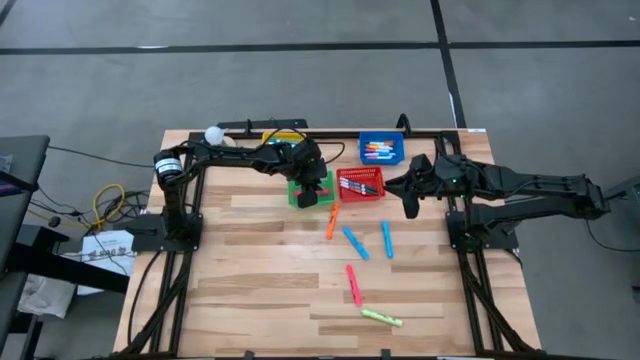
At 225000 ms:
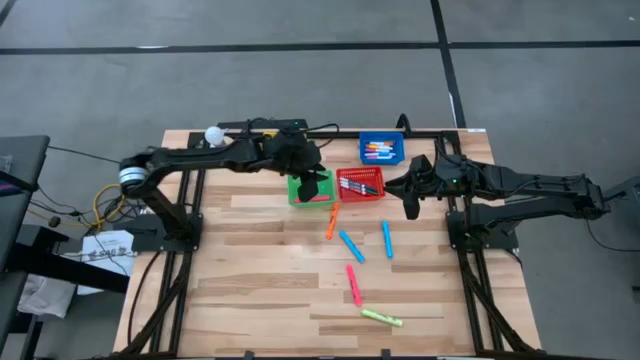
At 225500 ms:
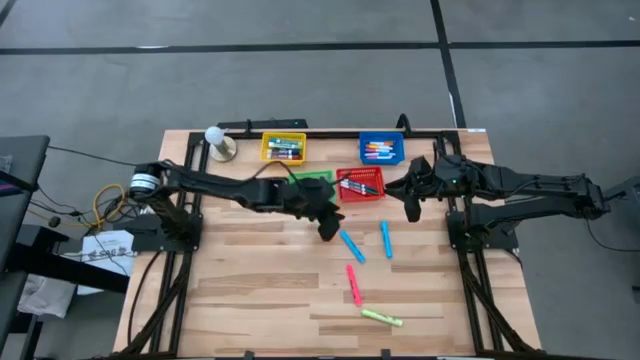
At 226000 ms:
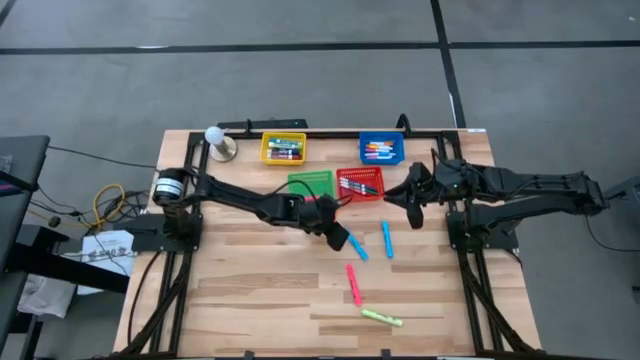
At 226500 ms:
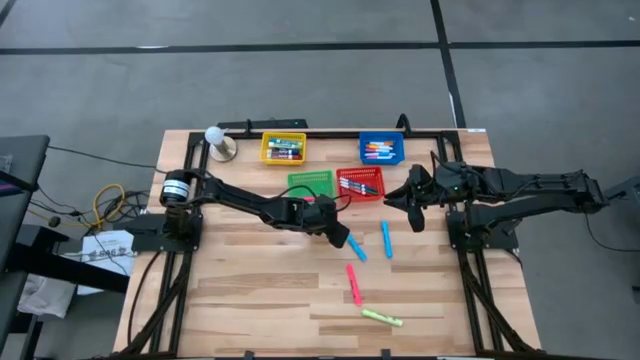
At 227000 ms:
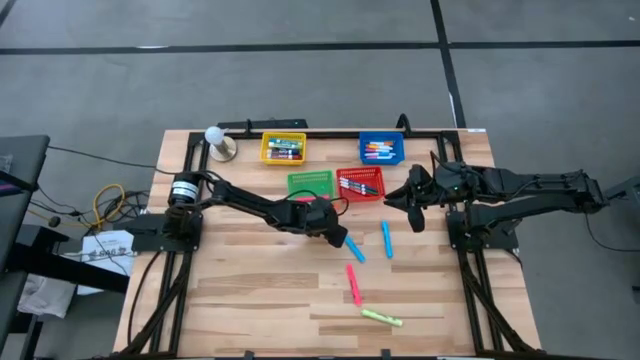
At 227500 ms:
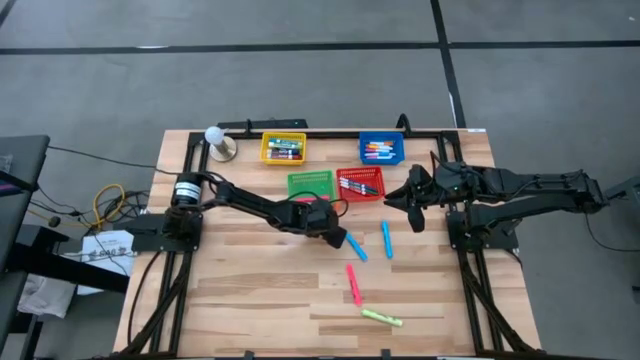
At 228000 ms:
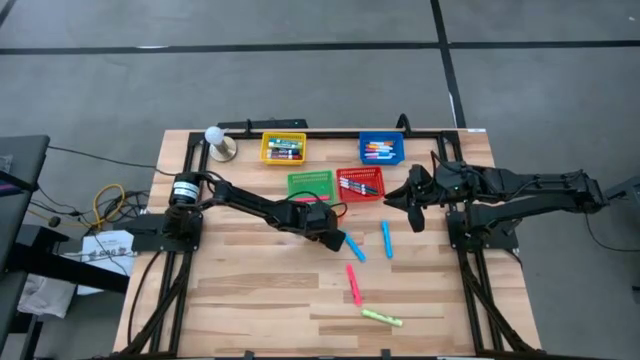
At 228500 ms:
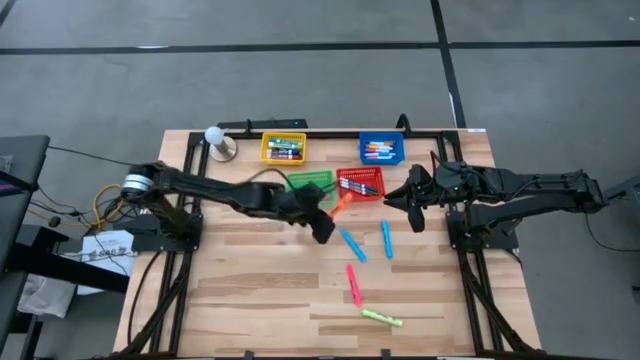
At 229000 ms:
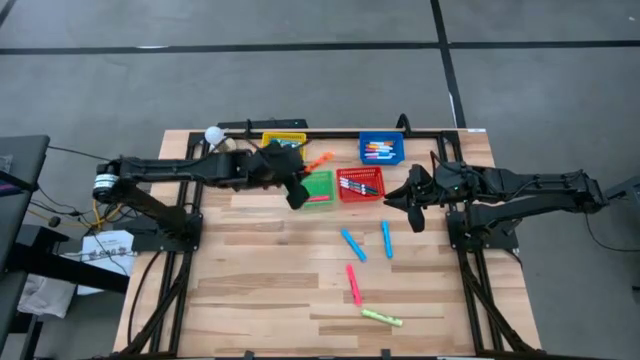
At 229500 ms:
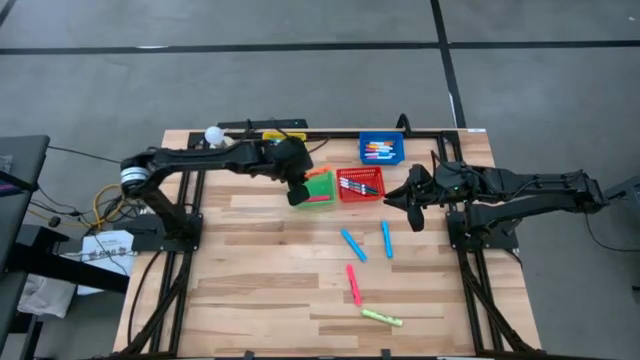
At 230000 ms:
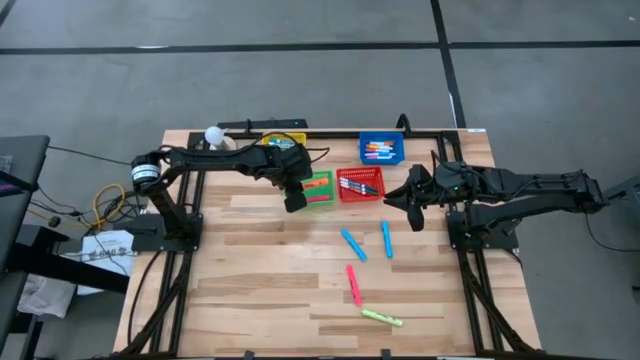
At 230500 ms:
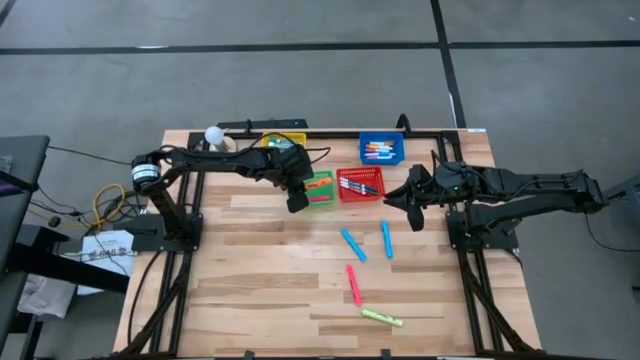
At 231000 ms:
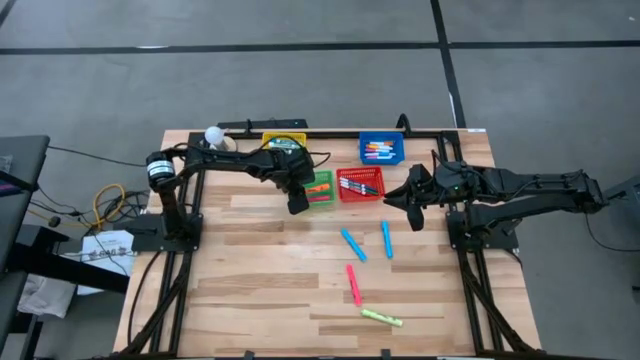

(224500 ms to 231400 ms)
Task: Pick & Place Markers
Put the large orange highlighter pen into the green bin

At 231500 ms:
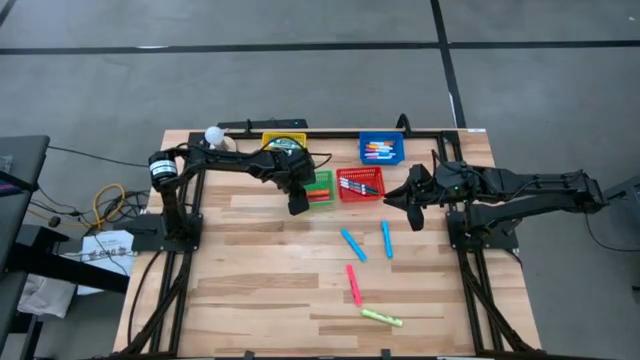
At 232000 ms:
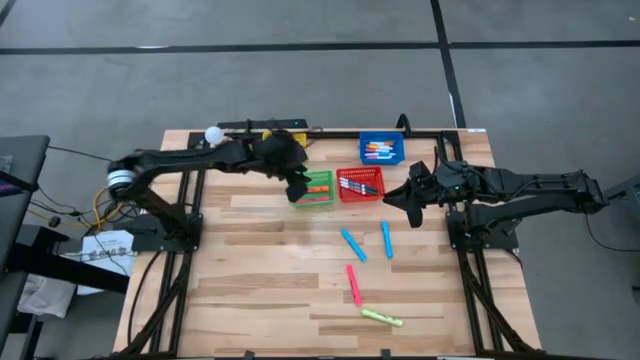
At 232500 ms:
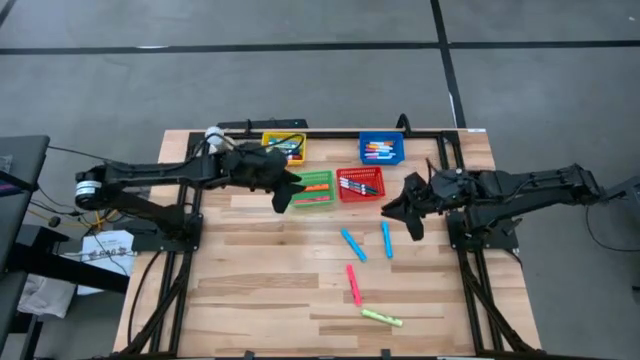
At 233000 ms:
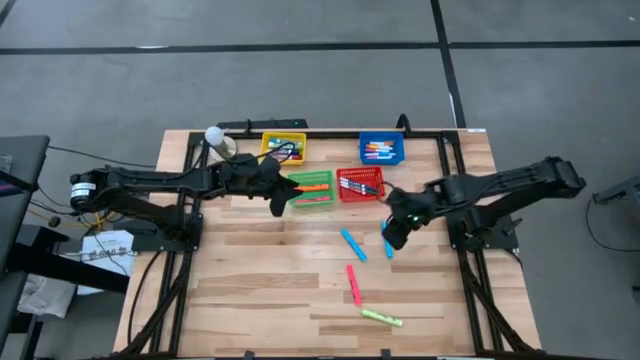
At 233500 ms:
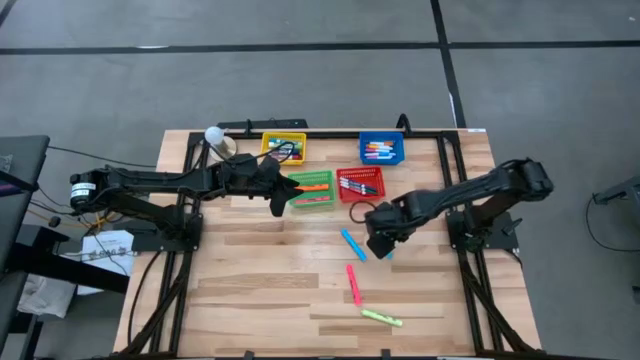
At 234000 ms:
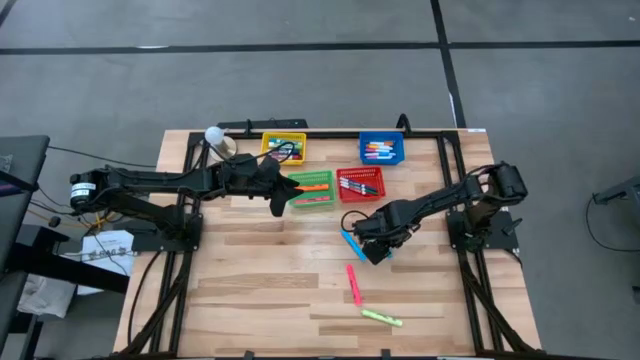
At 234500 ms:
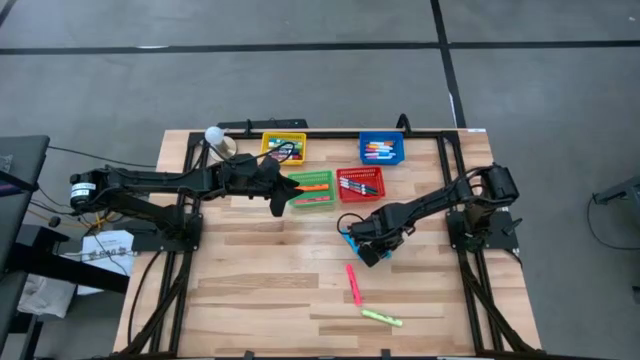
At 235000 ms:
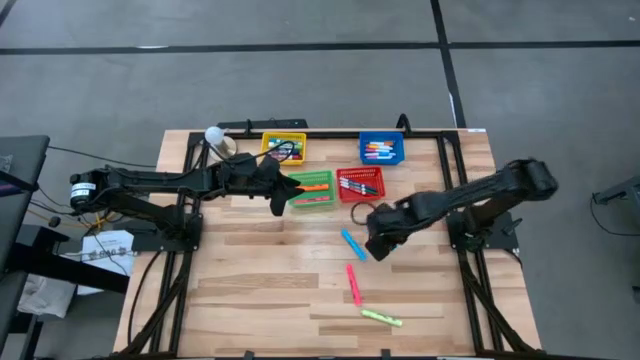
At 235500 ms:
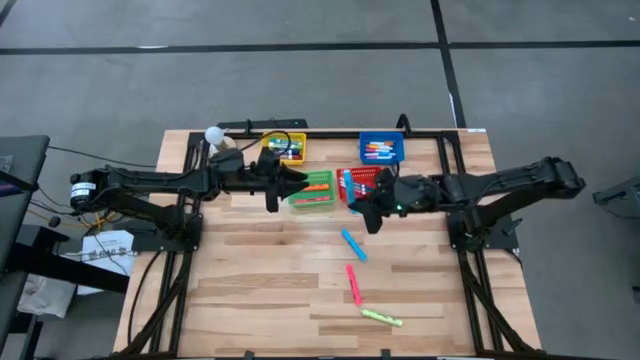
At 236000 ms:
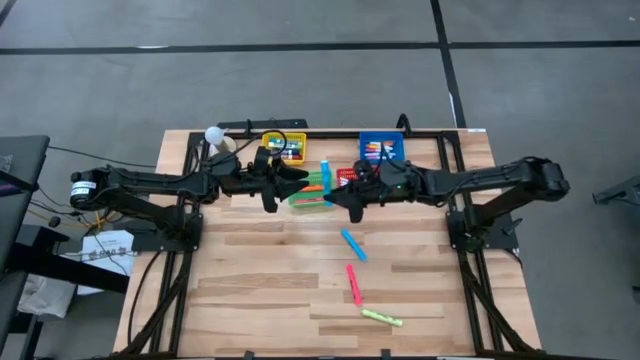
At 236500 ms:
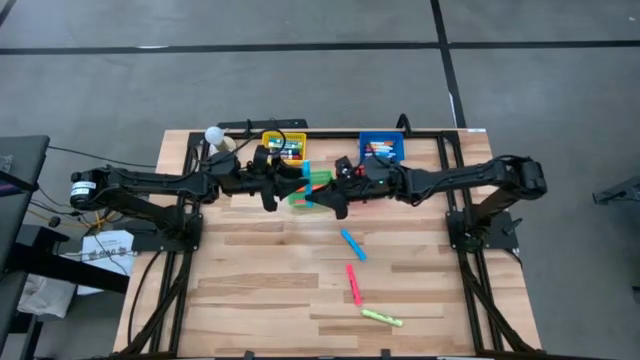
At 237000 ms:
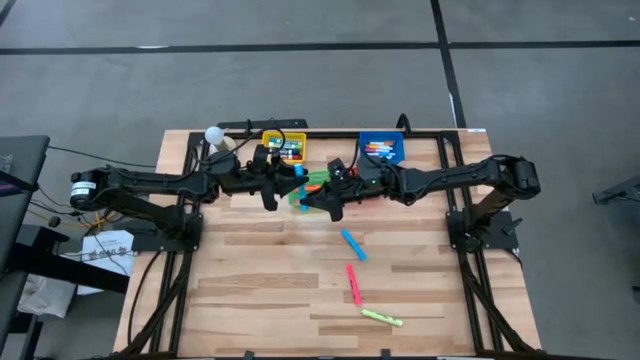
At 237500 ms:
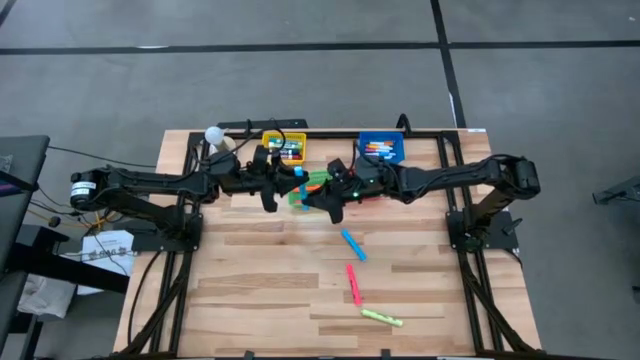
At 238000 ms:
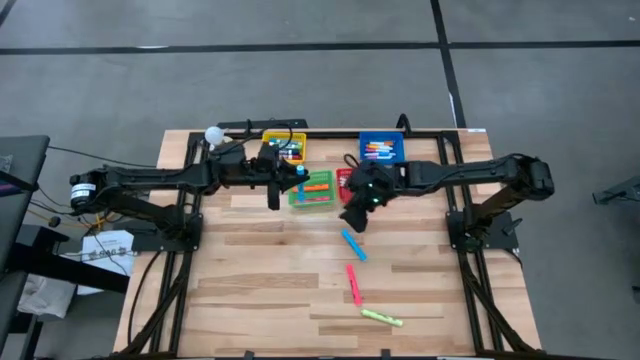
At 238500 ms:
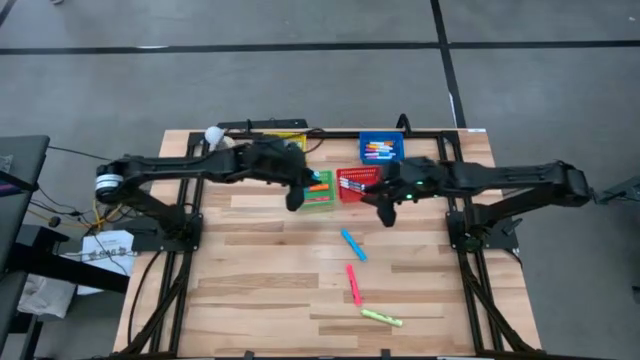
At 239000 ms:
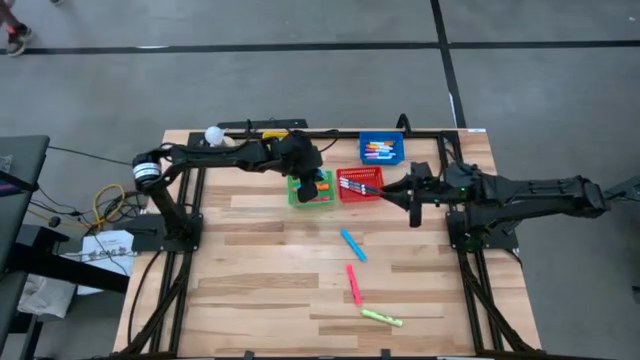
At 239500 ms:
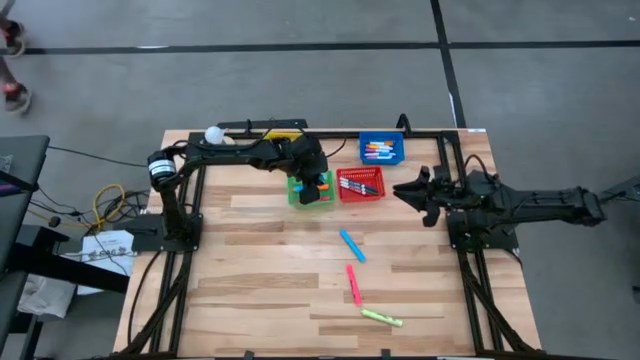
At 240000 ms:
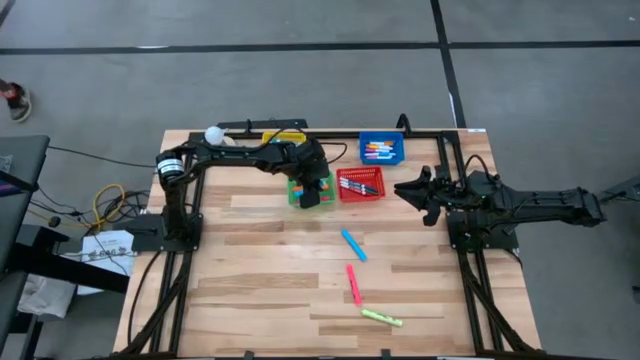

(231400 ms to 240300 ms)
Put the right large blue highlighter pen into the green bin

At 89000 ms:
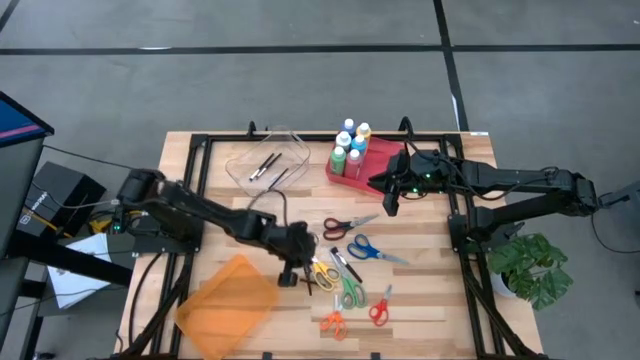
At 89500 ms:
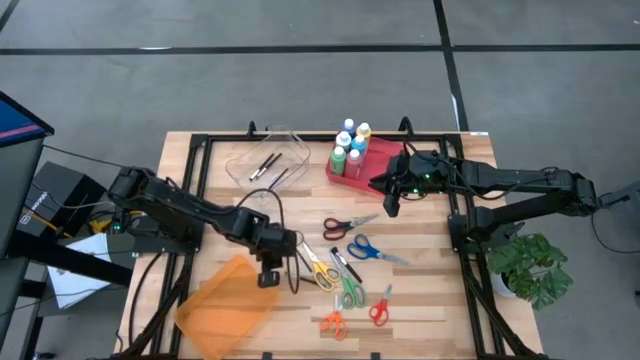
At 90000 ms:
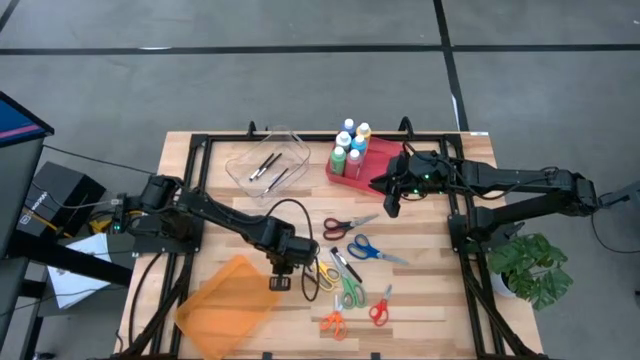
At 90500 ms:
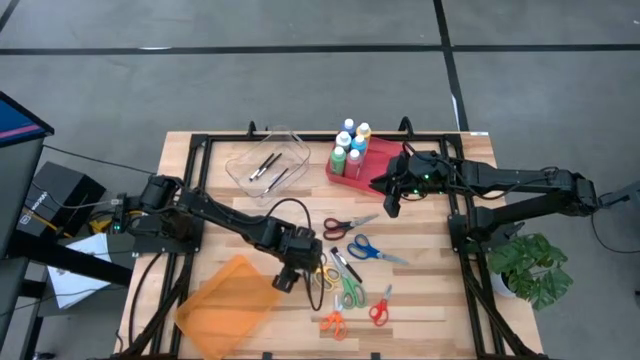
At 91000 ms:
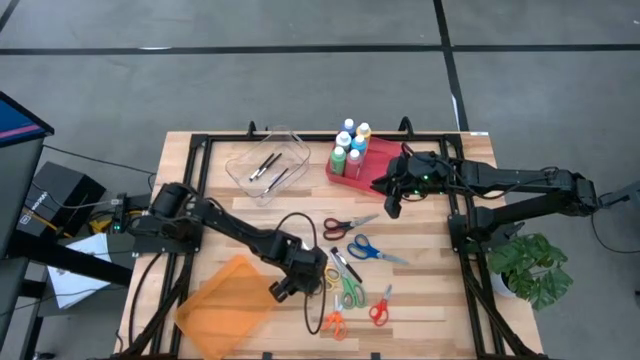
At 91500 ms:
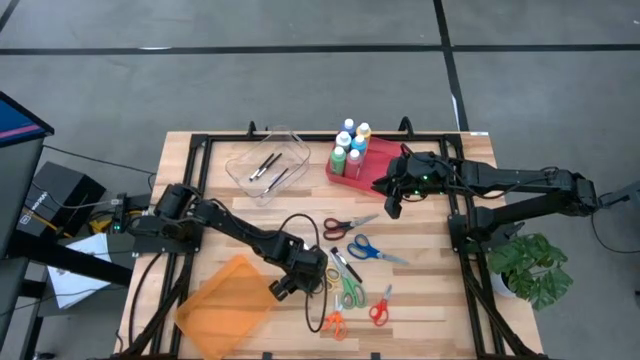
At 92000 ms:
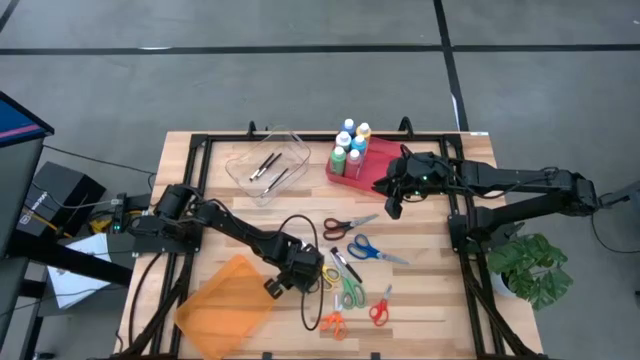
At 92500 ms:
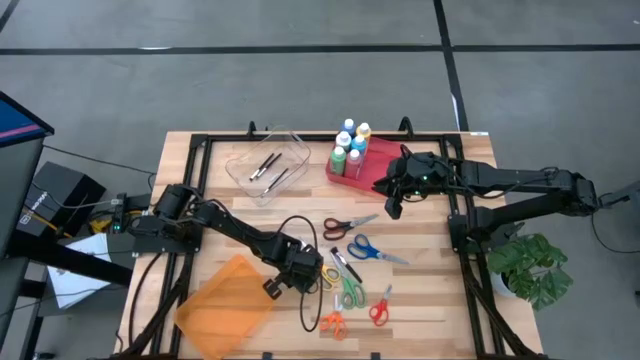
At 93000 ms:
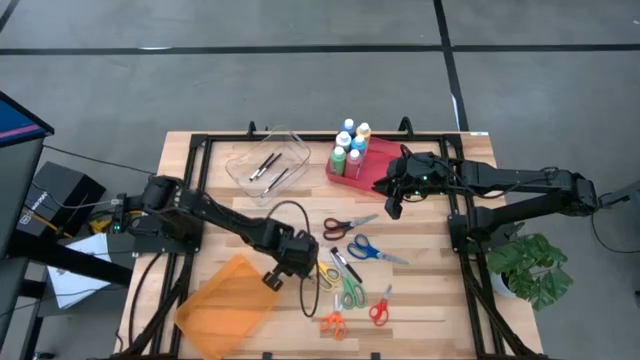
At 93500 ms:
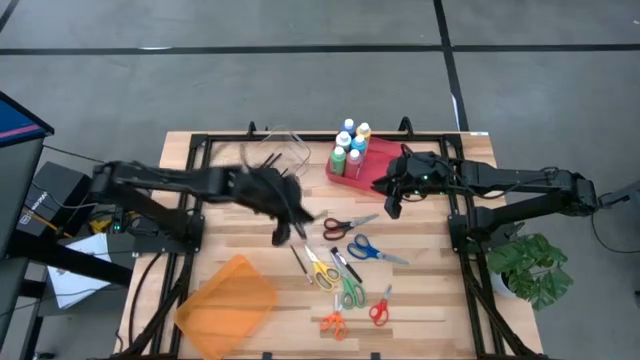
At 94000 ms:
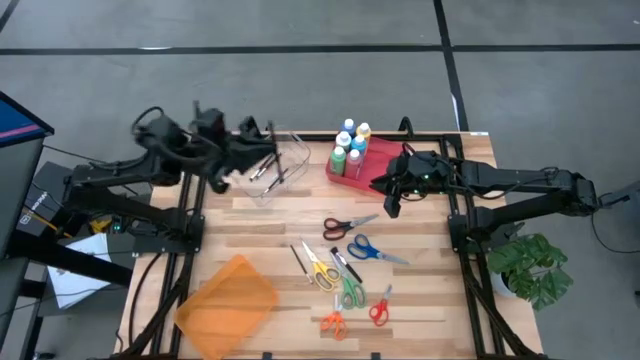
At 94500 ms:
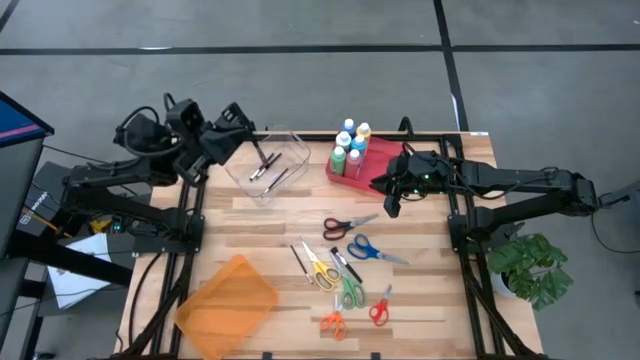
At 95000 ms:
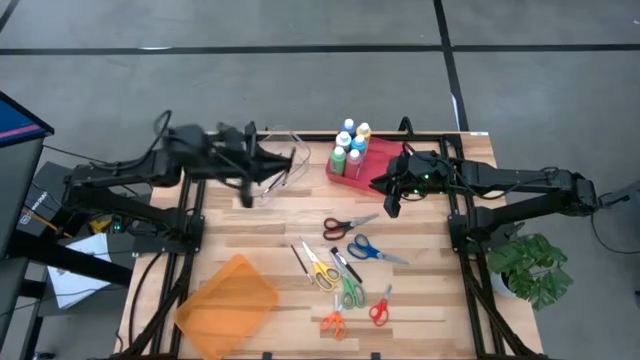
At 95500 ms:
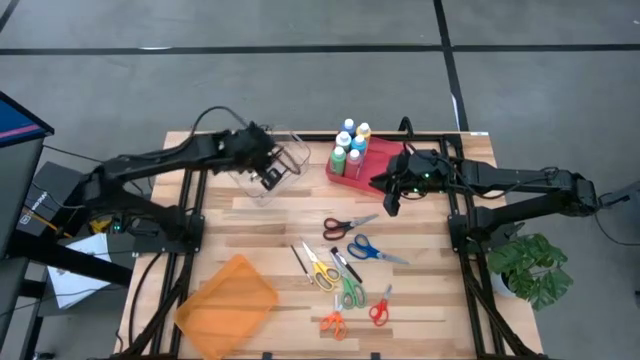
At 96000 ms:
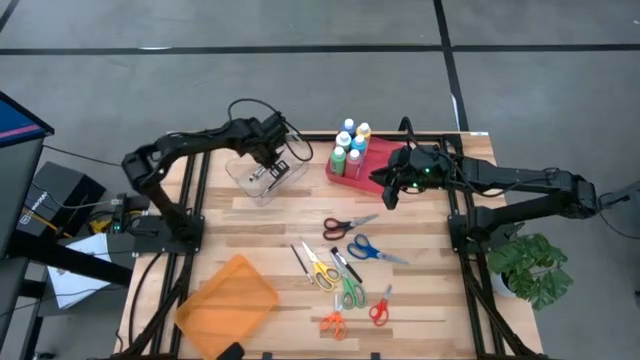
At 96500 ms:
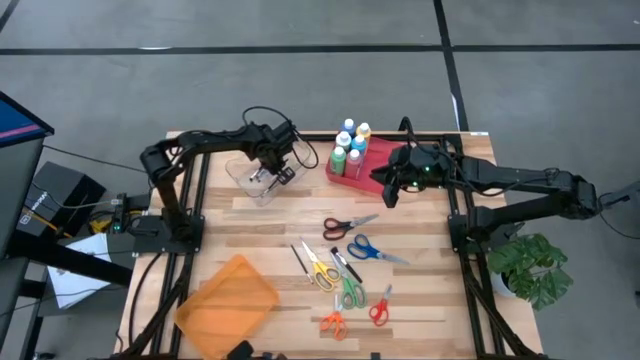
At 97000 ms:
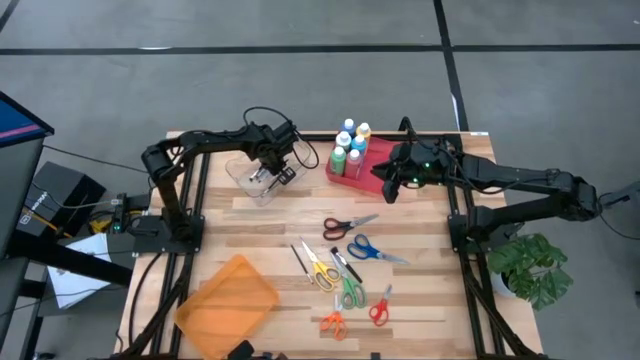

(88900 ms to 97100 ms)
Task: Pick & Place Paint Supplies
Put the black paint brush into the transparent bin
